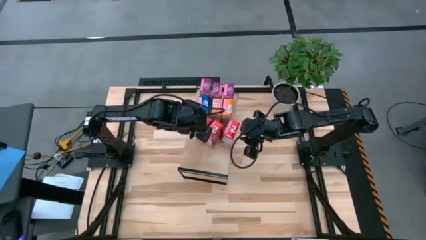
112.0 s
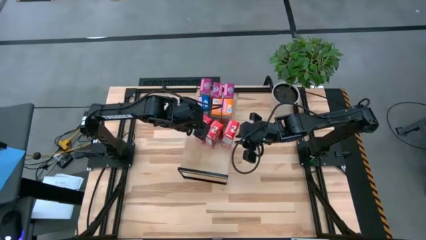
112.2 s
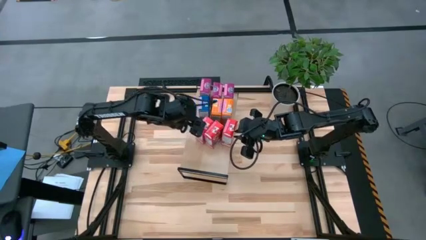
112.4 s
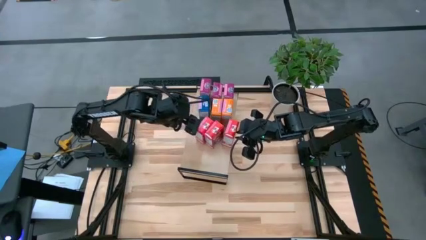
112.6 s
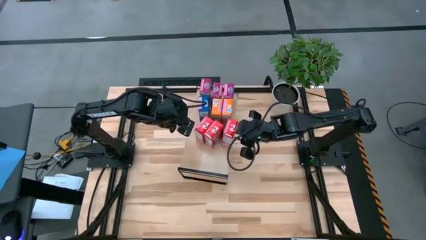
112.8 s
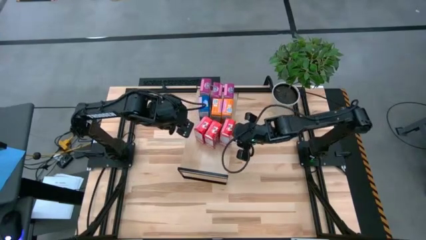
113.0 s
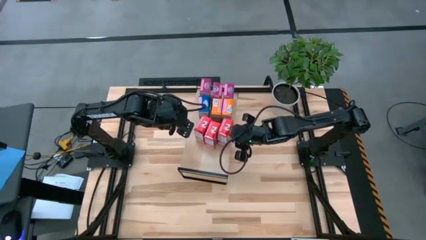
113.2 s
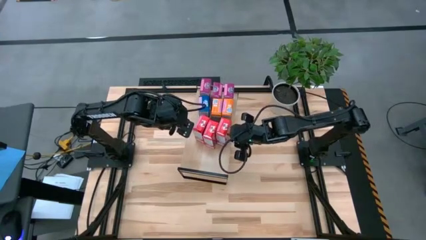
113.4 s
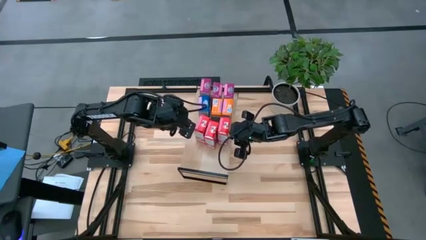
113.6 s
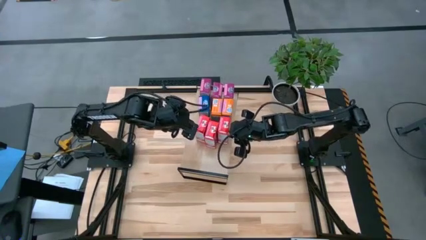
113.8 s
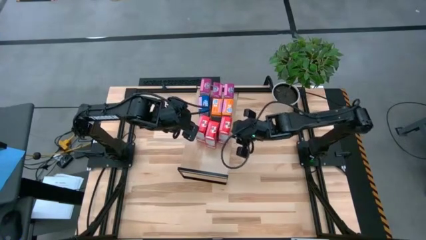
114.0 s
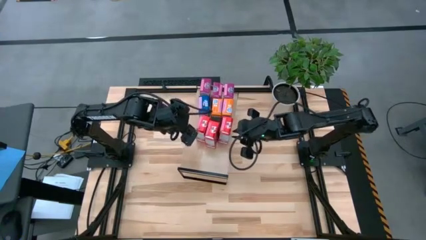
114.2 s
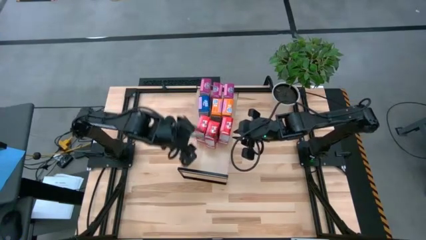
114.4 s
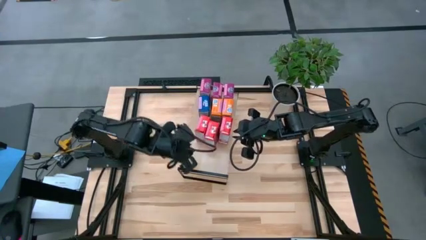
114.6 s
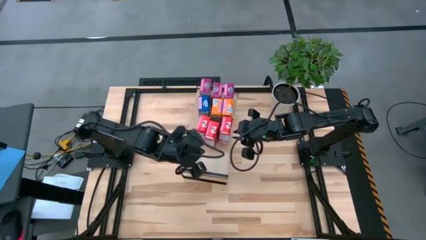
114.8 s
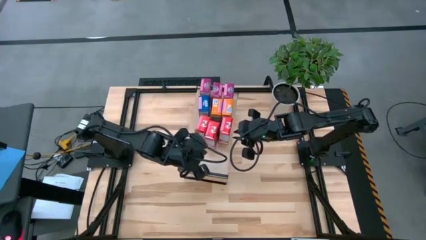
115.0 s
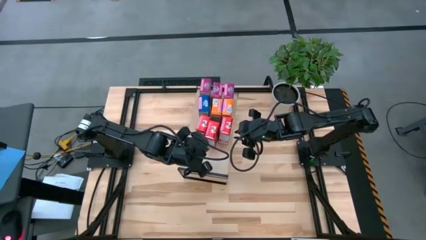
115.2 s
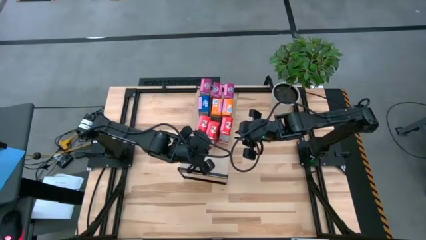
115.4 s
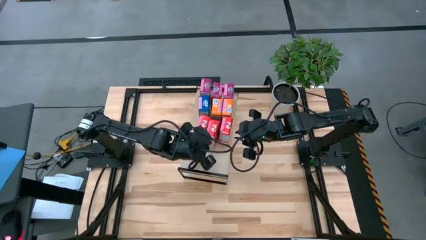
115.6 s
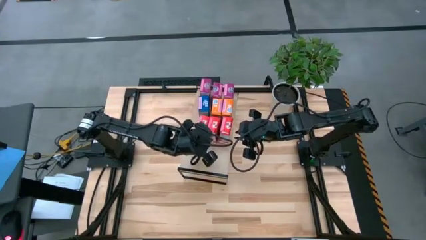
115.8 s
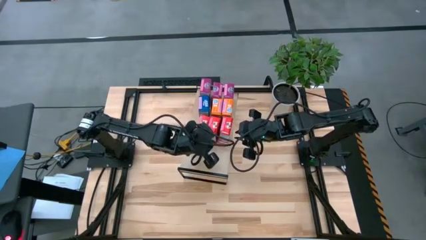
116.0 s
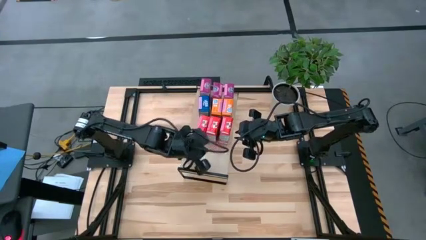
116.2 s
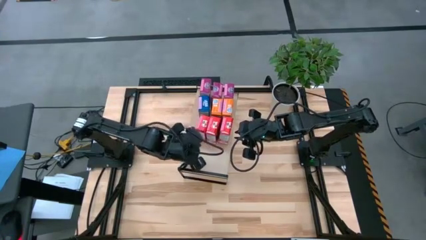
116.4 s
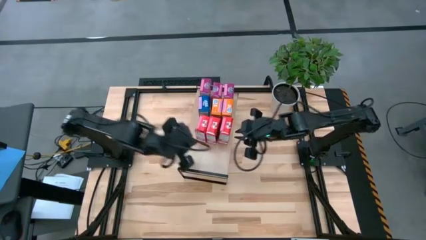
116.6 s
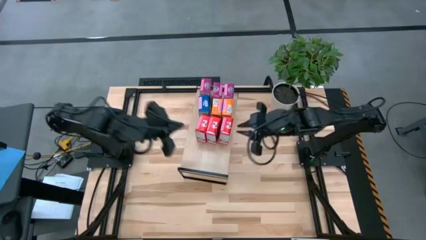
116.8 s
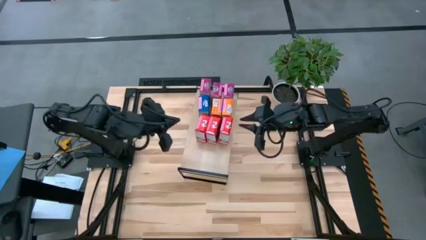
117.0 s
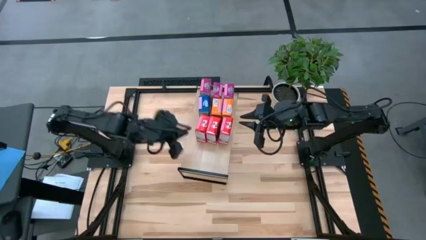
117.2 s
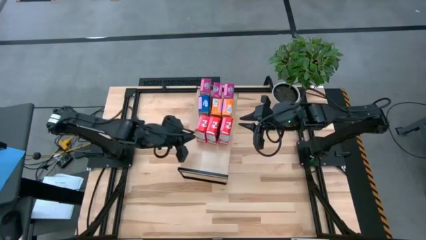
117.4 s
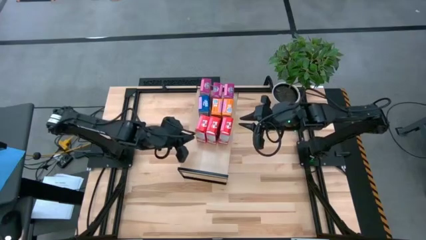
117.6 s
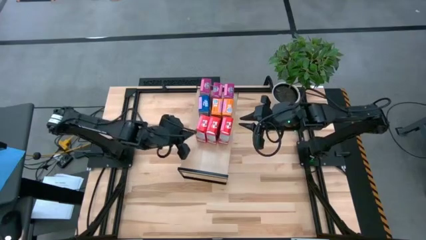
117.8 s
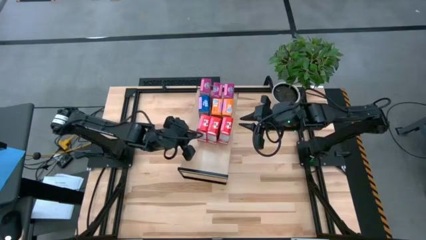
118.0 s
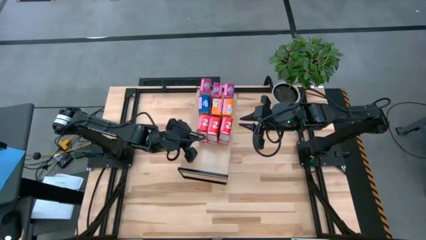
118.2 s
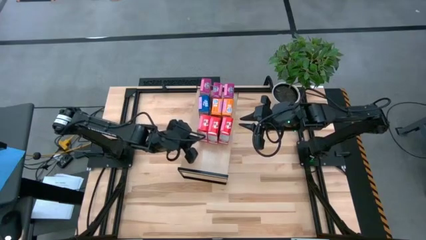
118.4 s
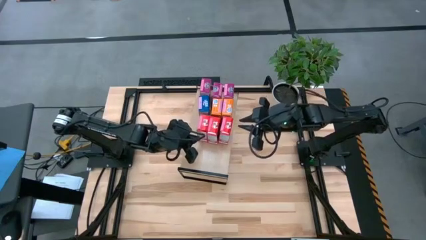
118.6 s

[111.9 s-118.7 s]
Task: Stack cereal on shelf
Adjust the red cereal boxes

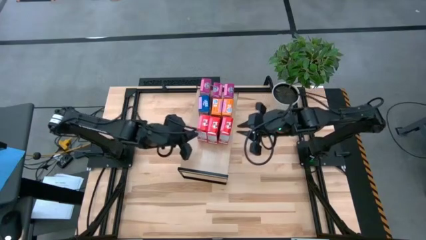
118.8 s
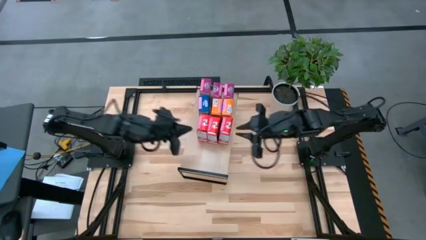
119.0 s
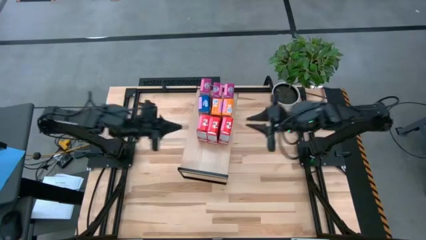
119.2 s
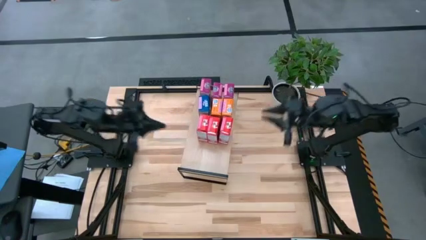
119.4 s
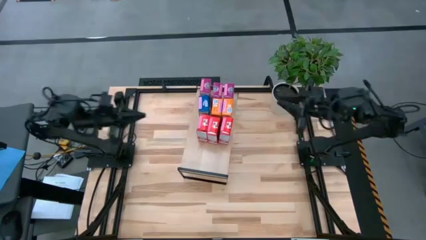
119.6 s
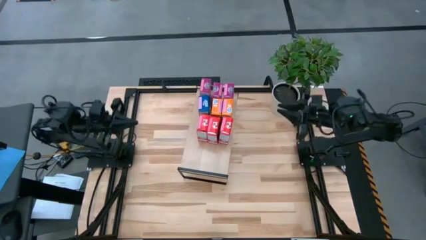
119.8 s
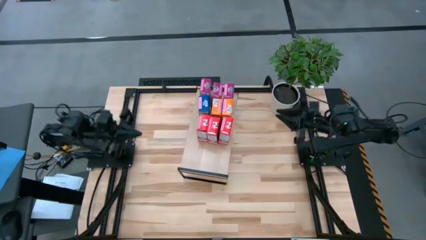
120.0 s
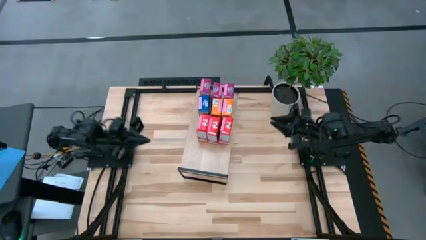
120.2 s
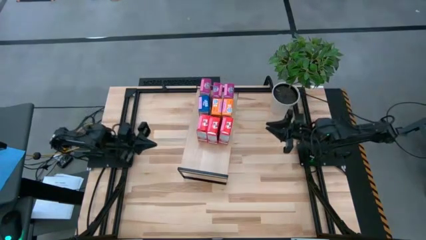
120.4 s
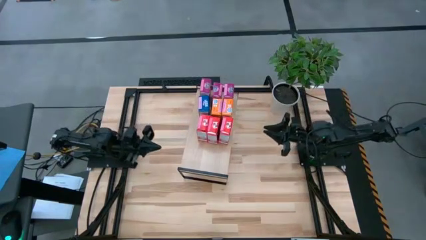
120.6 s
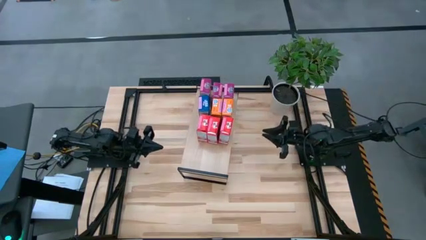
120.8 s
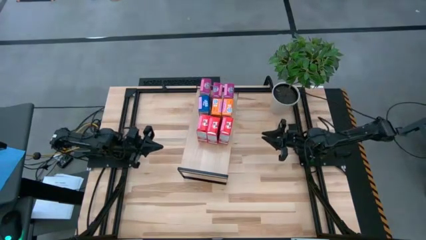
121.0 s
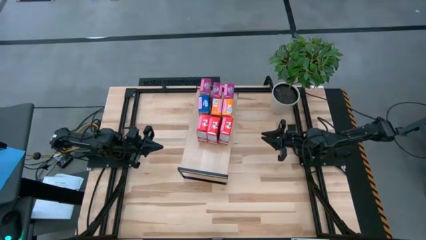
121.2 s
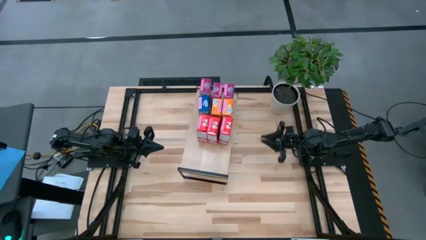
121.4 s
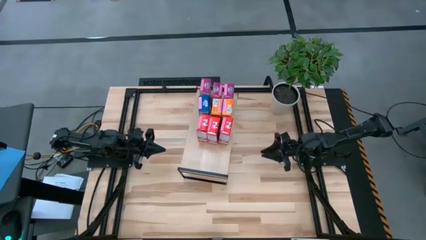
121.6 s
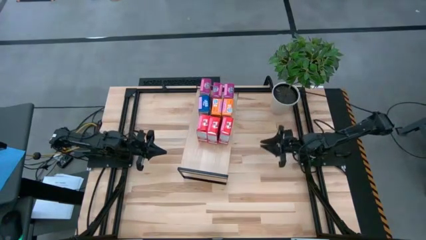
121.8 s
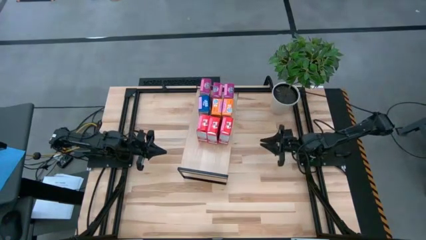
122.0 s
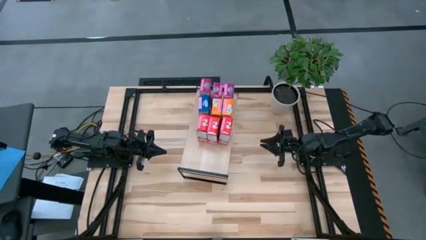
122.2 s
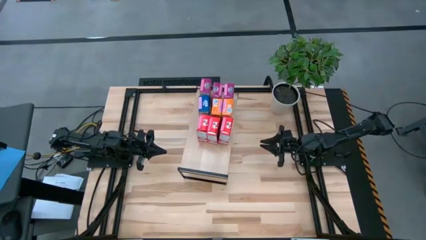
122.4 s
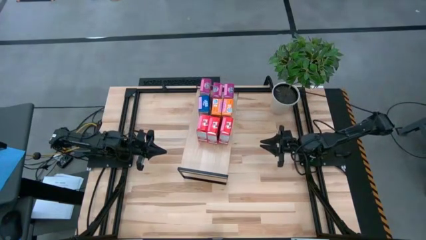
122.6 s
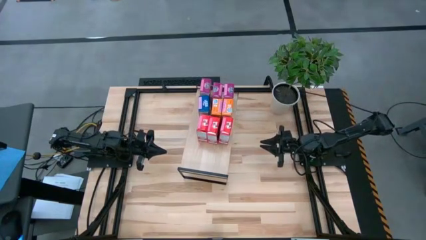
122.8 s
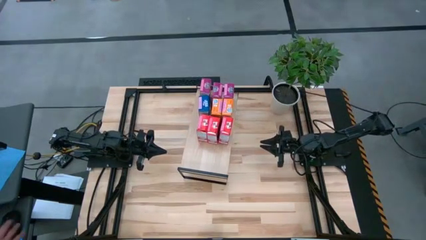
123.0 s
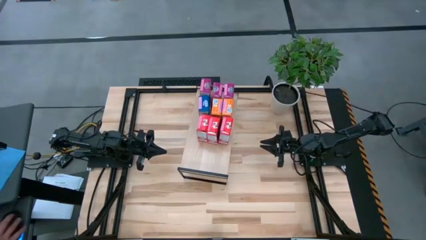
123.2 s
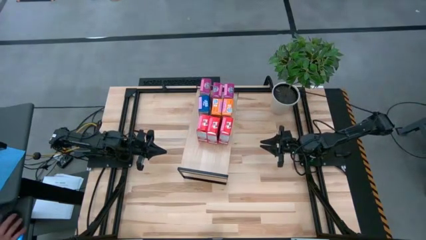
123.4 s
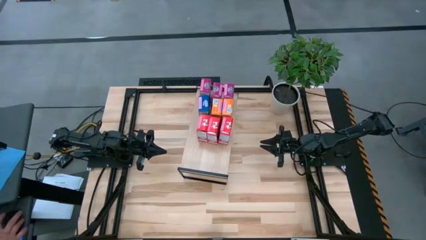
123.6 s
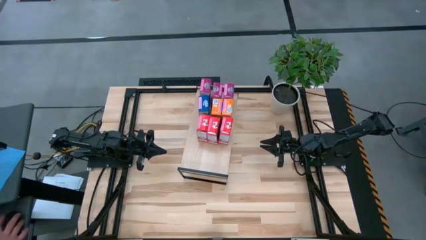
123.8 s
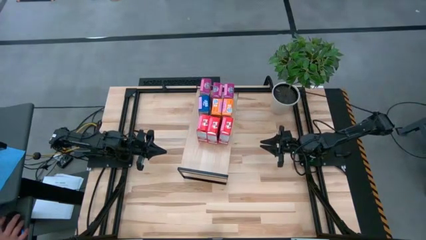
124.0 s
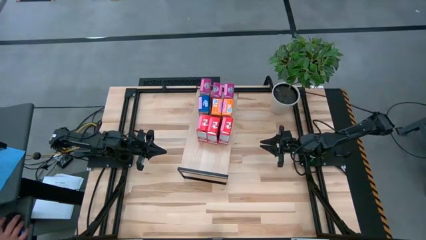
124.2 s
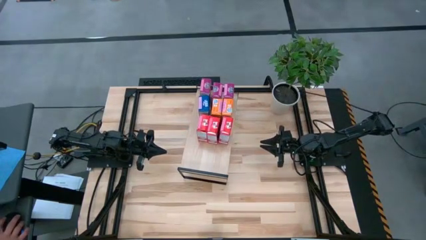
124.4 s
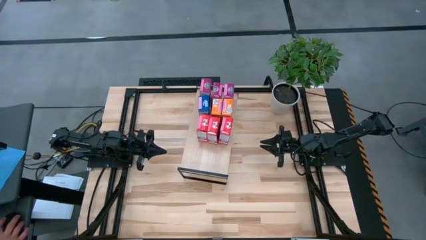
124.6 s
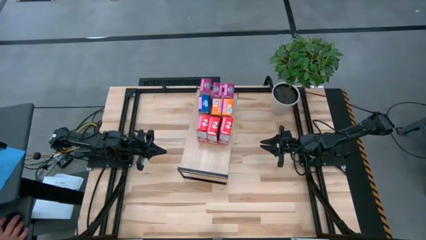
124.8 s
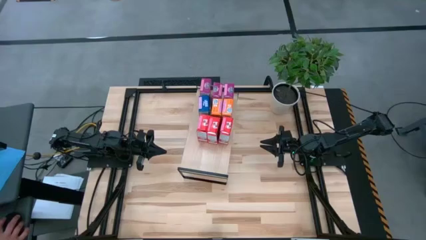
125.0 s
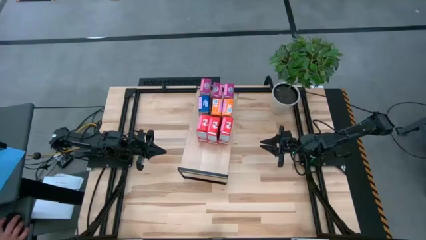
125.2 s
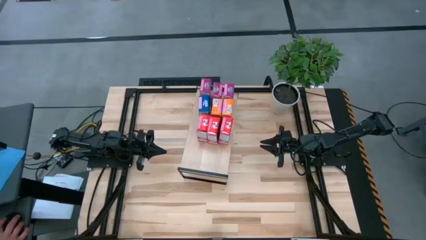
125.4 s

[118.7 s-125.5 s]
Return to Home Position
